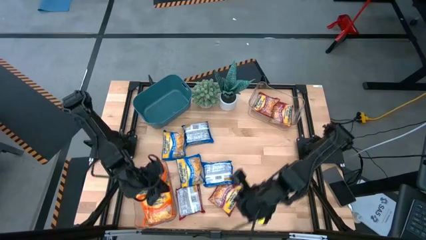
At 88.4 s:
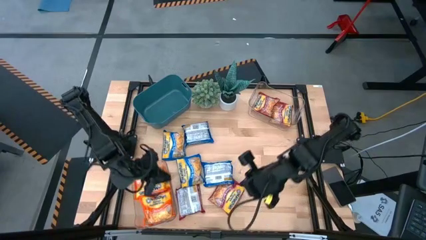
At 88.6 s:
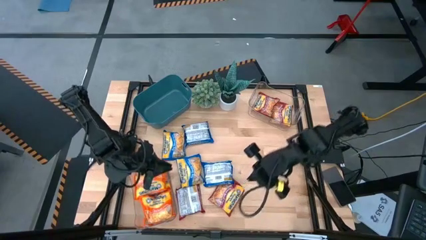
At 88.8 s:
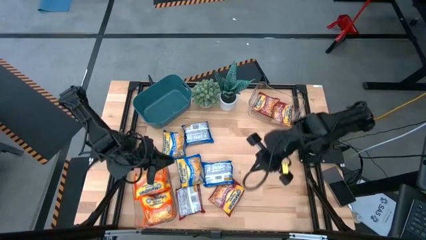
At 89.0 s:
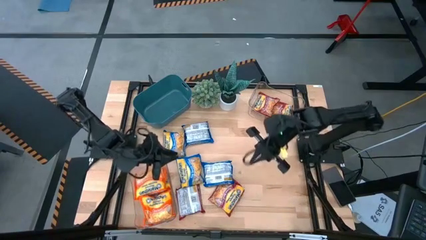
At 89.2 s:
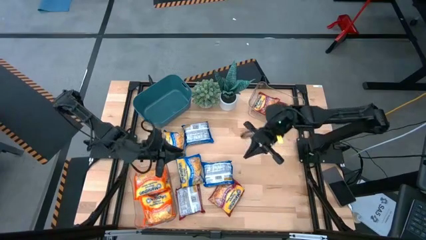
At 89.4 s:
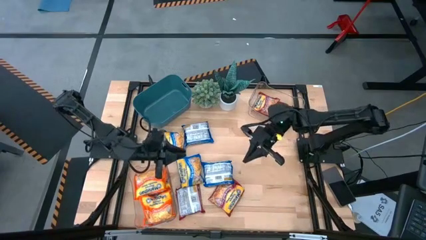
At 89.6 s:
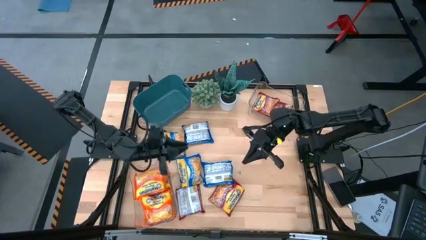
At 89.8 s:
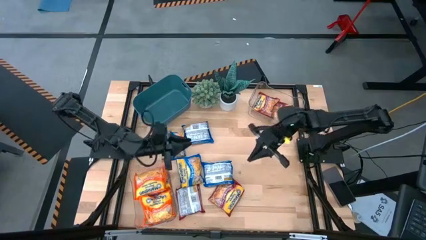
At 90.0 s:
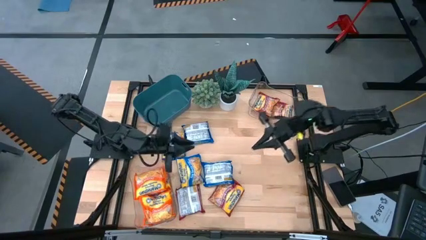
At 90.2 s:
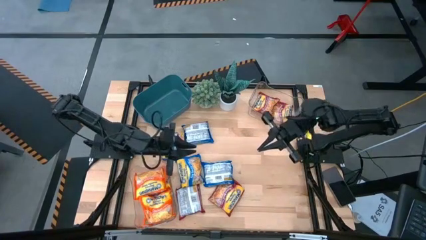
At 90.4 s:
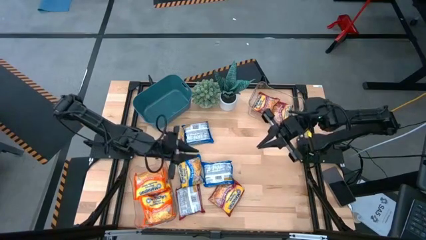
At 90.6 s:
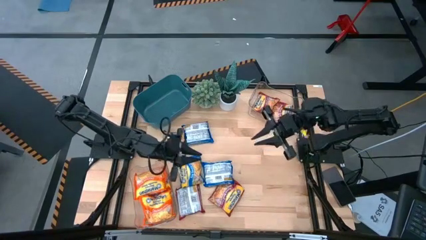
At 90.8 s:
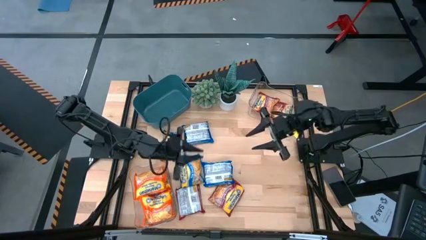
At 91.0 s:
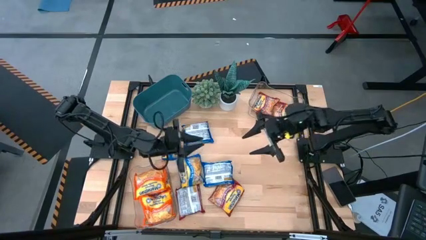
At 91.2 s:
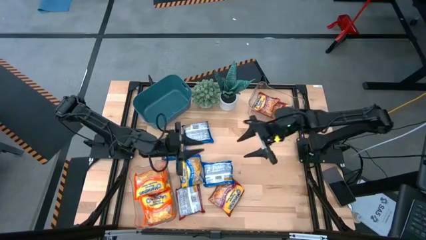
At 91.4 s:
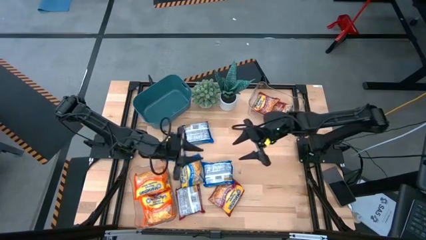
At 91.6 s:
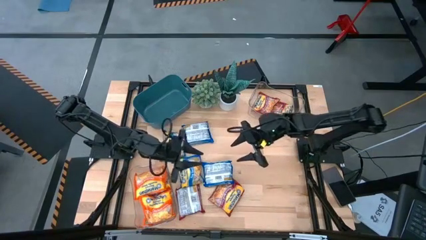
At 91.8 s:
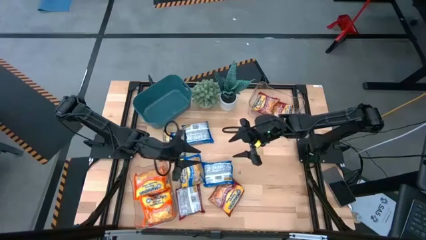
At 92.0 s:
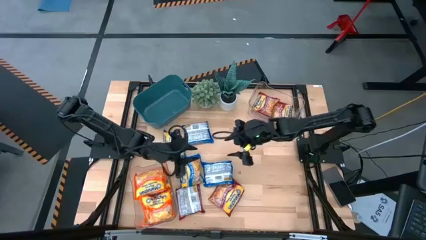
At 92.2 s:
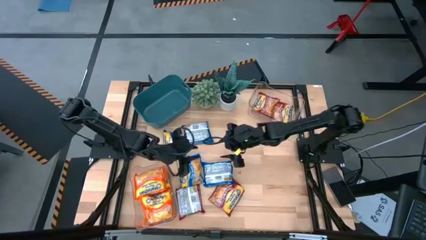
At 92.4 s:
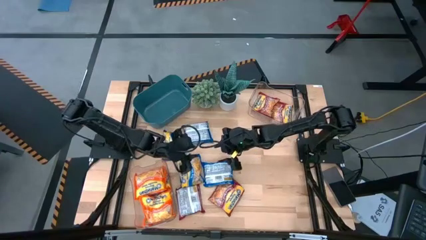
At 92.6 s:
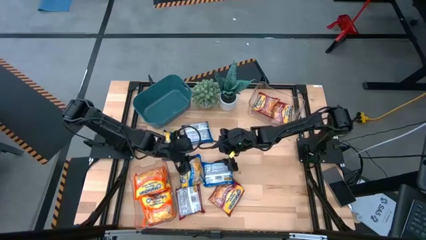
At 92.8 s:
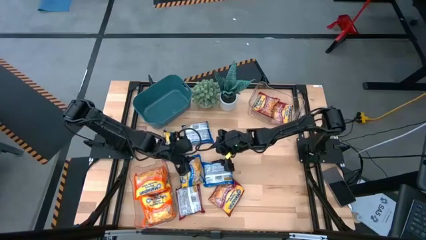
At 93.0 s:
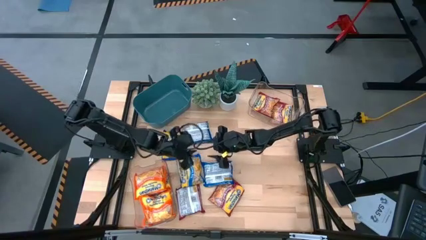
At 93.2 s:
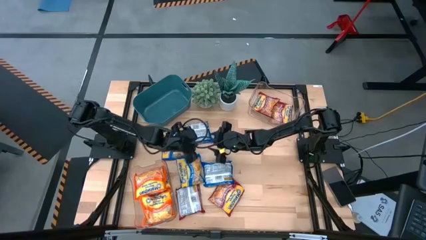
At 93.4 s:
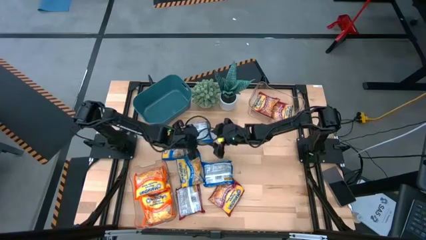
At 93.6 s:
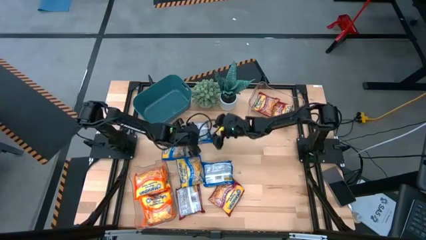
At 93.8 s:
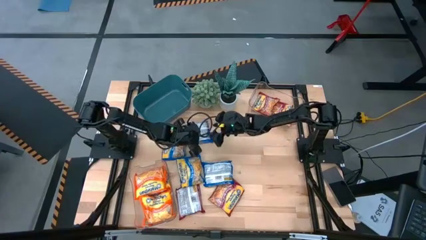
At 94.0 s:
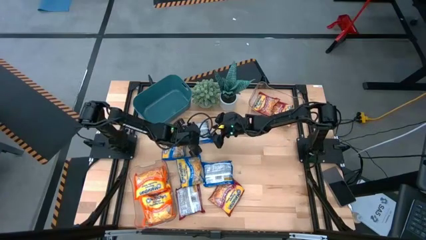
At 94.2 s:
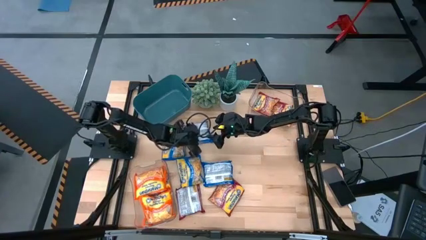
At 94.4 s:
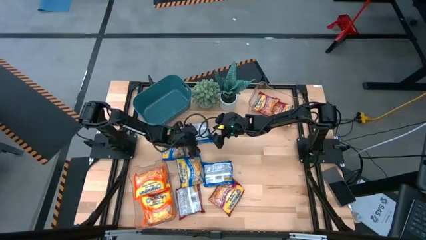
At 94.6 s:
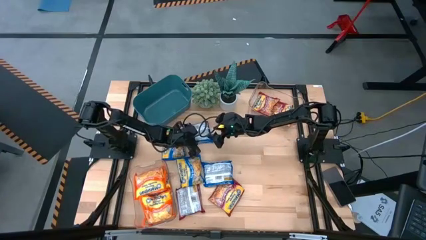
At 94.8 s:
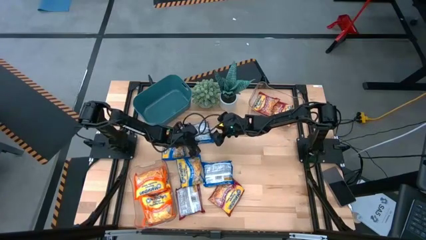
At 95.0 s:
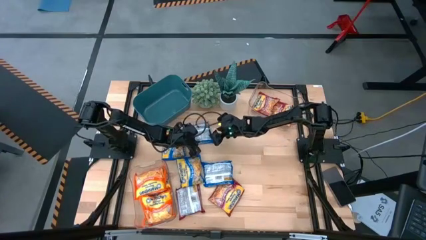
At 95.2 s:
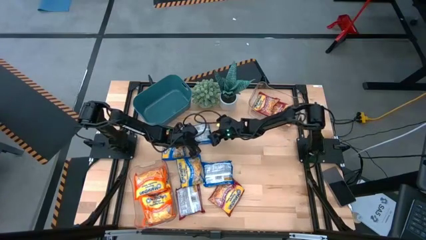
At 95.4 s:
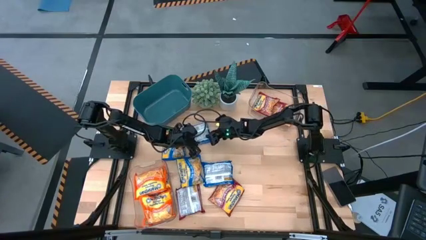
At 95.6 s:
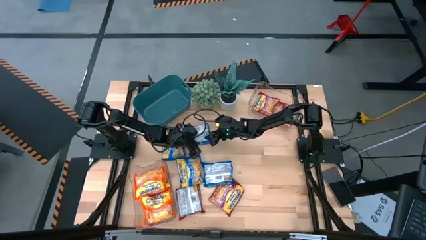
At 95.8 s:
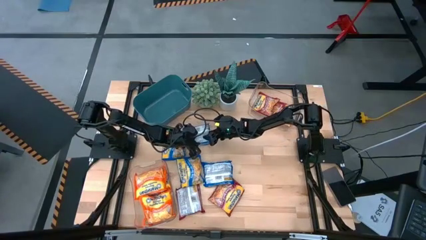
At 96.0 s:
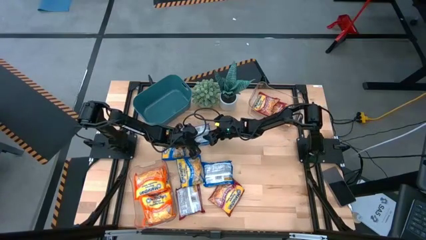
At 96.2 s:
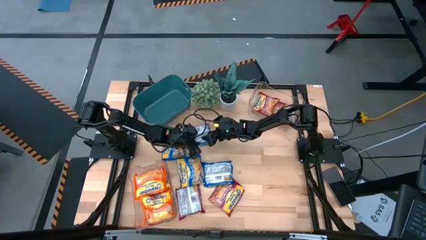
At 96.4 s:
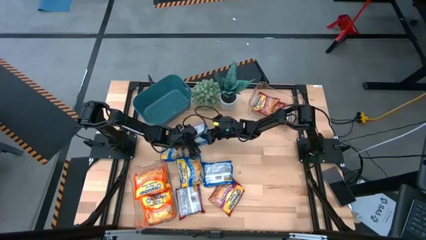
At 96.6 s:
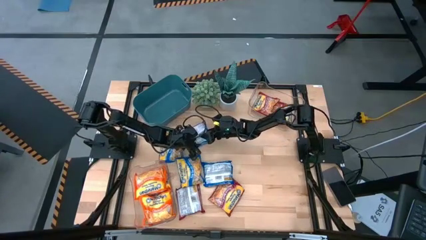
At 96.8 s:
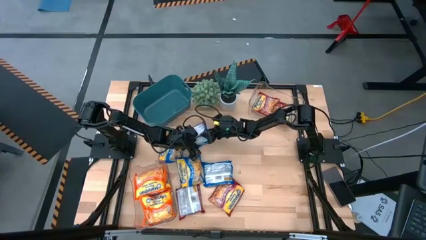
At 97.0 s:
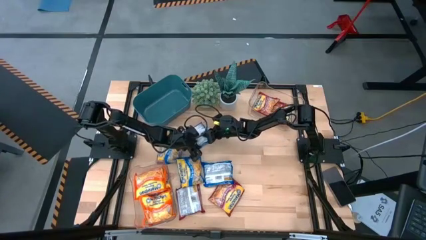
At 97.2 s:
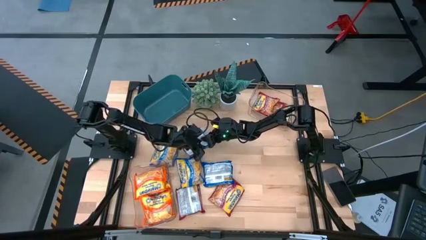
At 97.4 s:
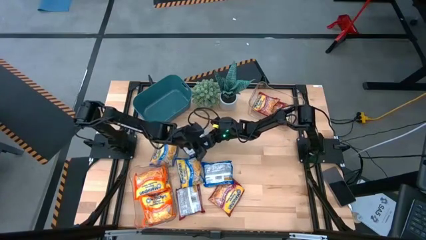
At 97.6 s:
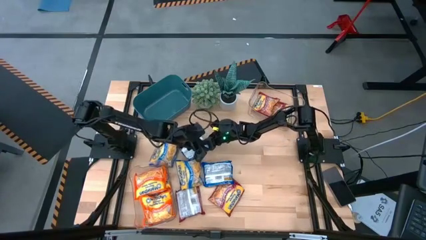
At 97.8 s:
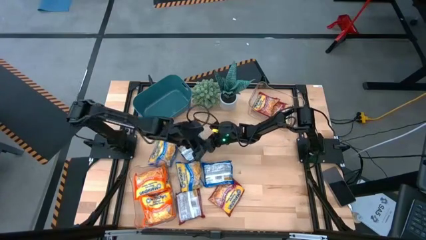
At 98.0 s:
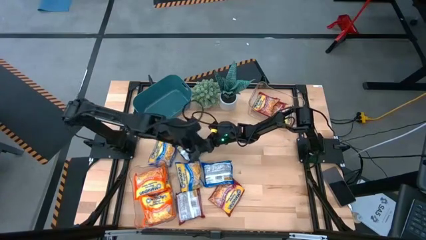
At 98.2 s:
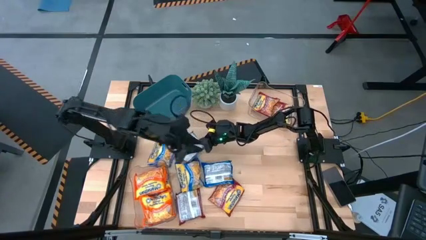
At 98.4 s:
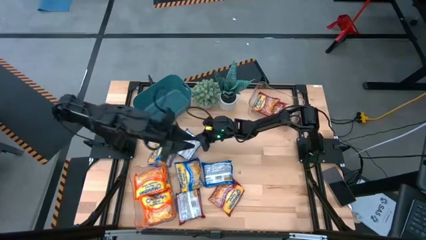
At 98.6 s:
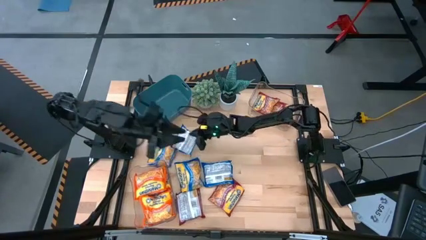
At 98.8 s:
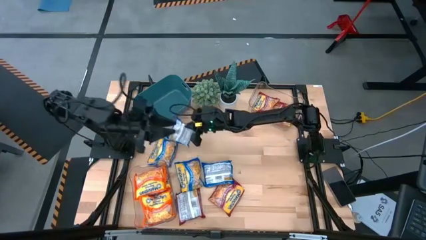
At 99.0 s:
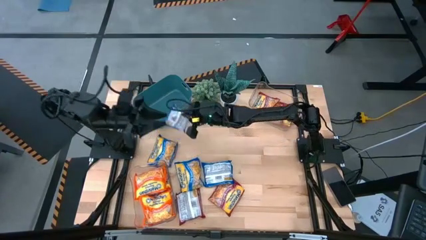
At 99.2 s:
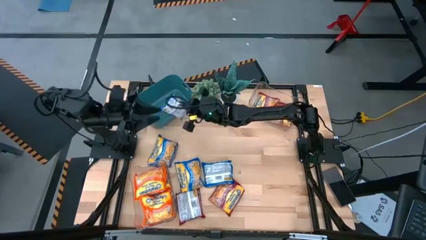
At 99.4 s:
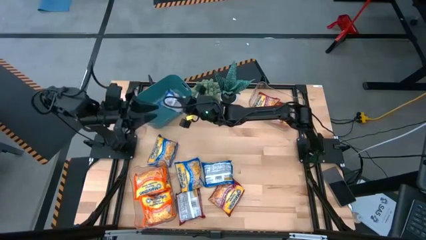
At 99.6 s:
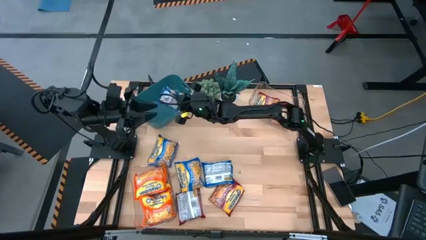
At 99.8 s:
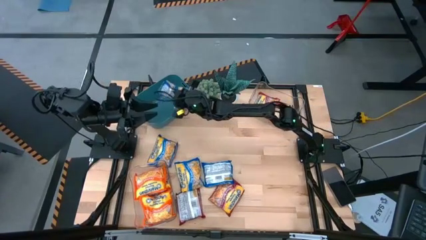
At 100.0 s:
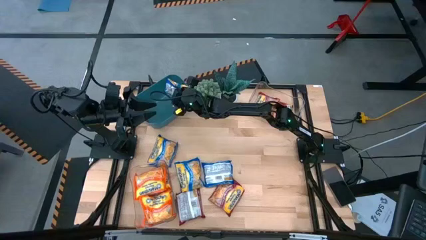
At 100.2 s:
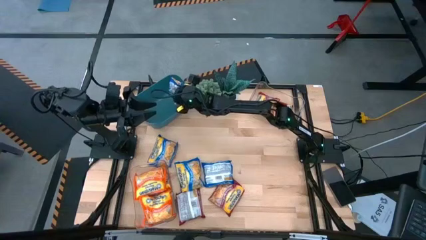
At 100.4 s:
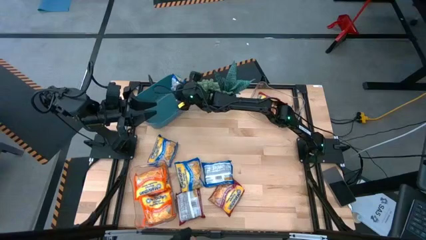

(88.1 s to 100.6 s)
Task: Sort Maruchan noodles
Put the blue noodle pack into the green bin

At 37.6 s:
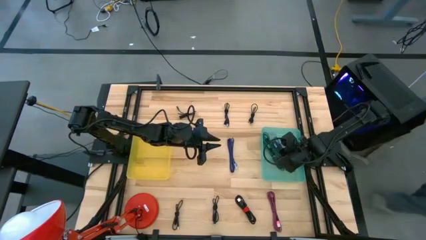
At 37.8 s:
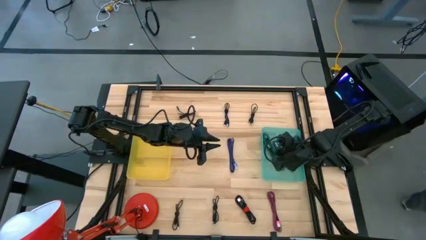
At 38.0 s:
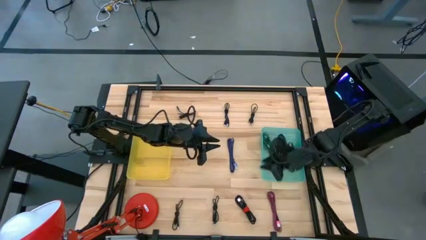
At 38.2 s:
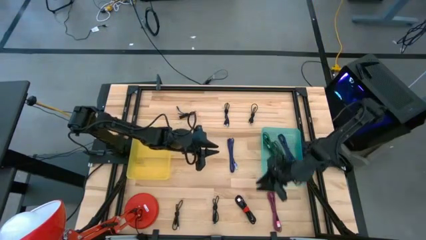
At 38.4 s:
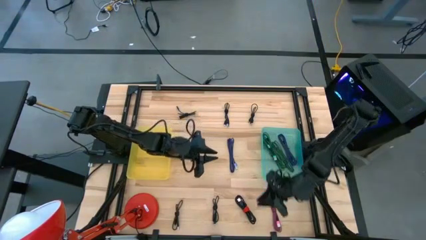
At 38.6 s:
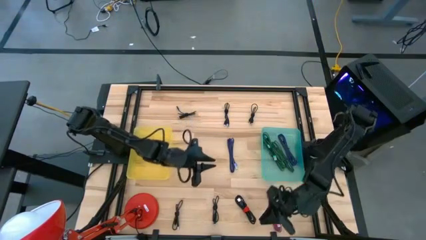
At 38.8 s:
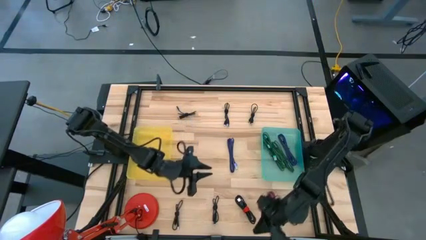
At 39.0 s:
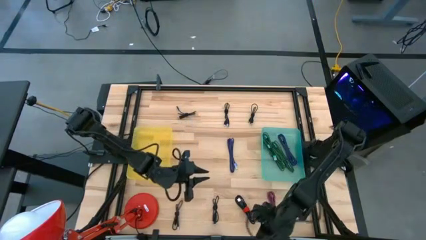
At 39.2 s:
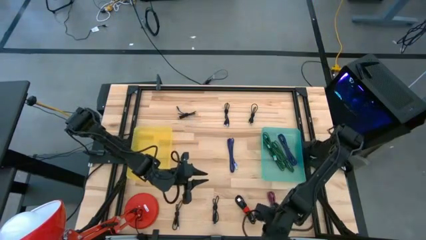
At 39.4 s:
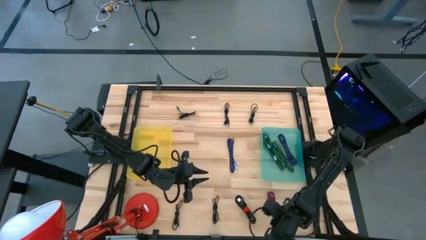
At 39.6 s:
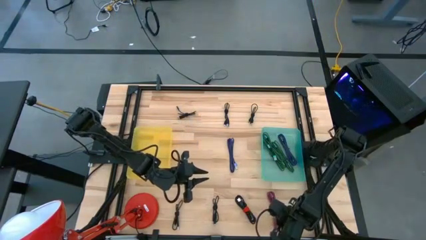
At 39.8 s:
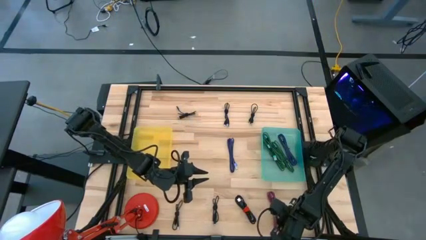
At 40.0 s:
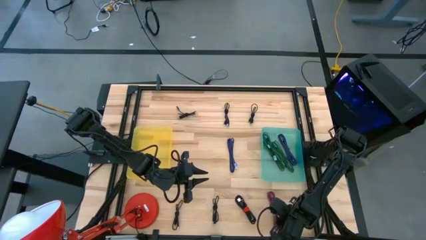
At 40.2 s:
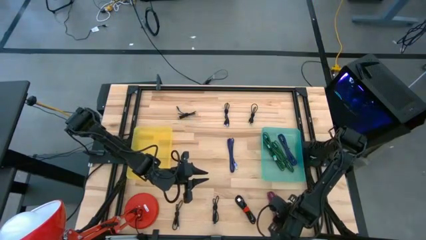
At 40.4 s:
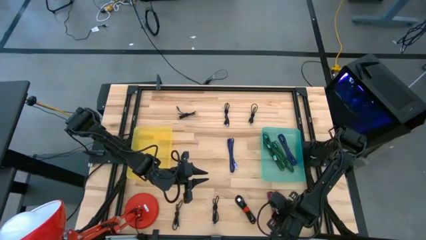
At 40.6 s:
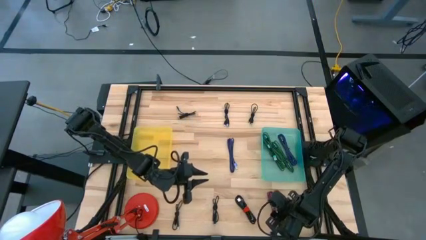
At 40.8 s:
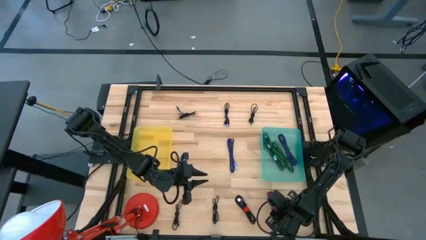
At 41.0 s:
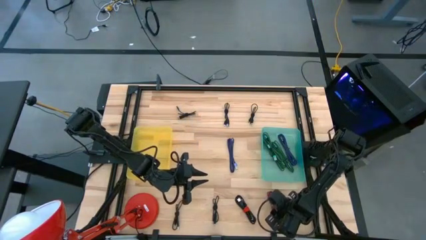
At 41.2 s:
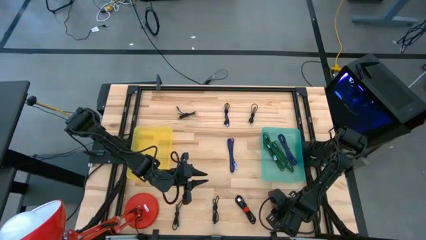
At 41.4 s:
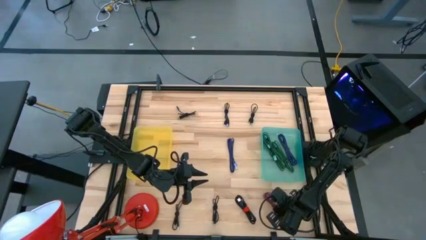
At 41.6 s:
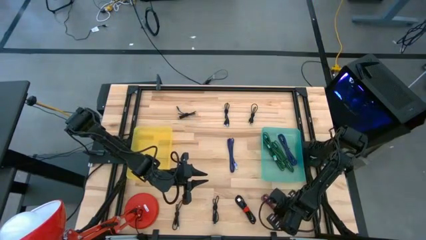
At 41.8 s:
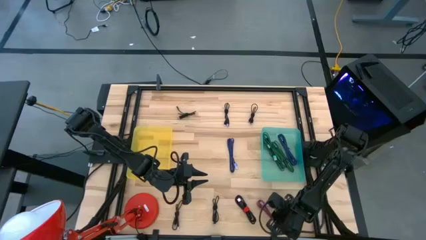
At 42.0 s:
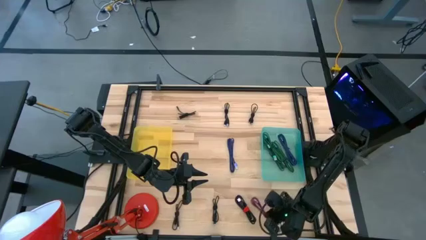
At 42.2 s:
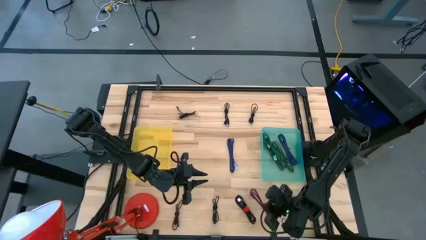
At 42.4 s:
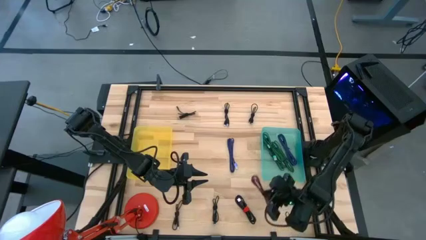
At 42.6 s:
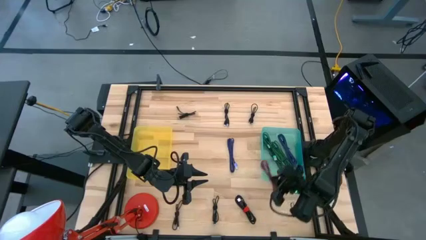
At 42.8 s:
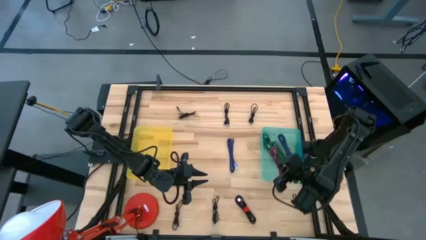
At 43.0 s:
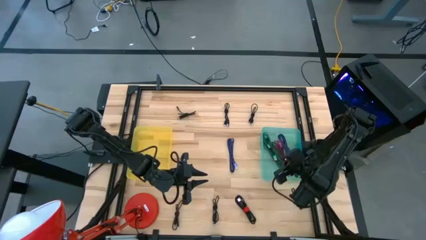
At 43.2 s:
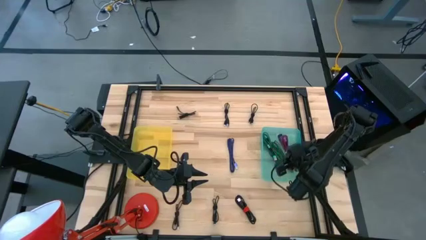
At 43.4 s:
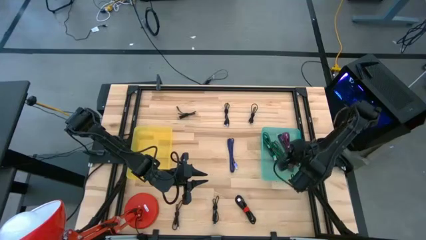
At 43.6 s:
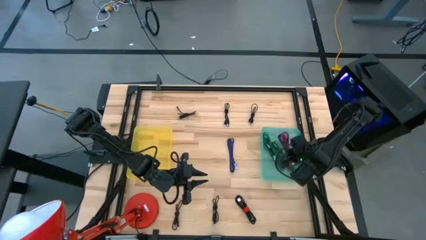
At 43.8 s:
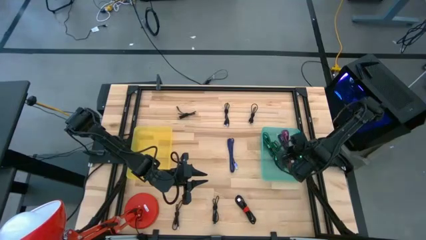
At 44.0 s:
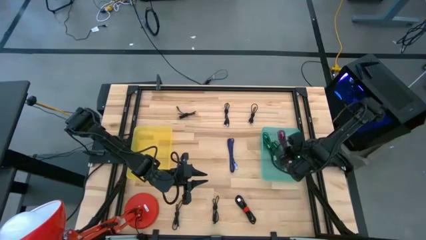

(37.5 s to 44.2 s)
Task: Pick & Place USB Port
Put the black and pink charger cable into the light green bin
